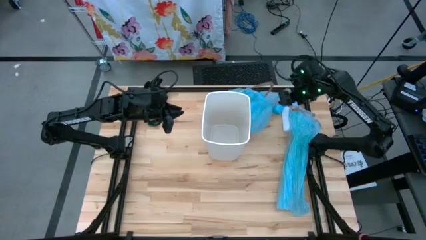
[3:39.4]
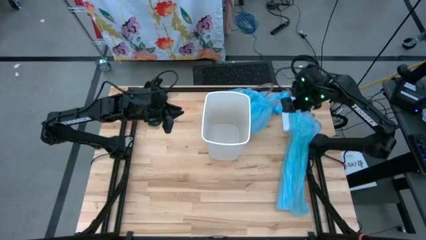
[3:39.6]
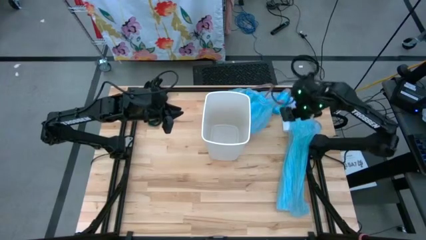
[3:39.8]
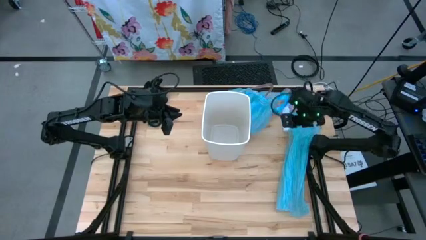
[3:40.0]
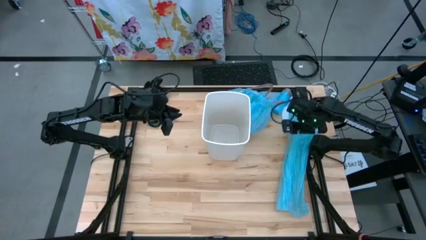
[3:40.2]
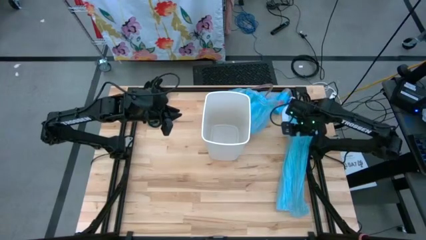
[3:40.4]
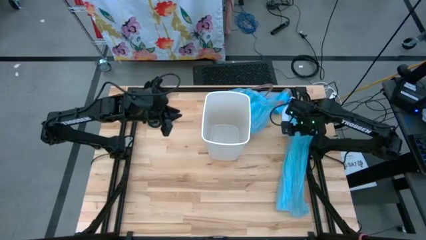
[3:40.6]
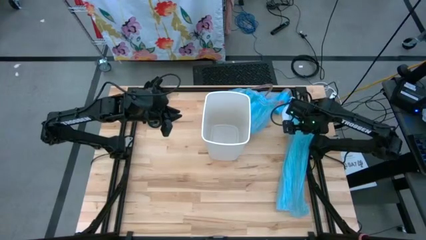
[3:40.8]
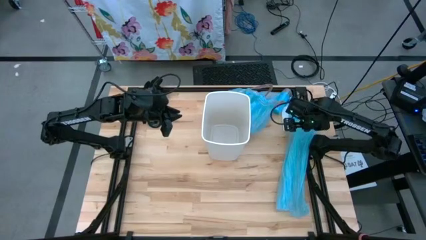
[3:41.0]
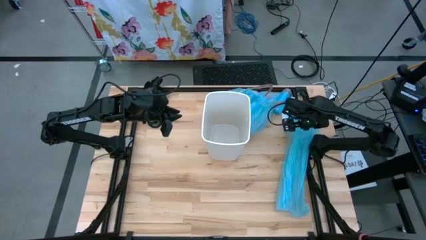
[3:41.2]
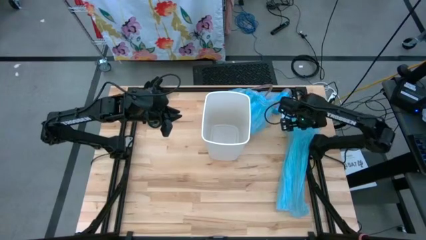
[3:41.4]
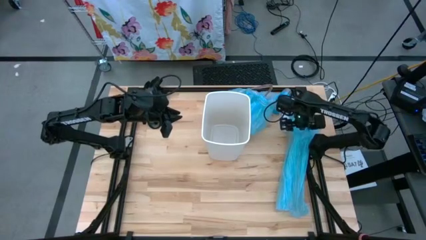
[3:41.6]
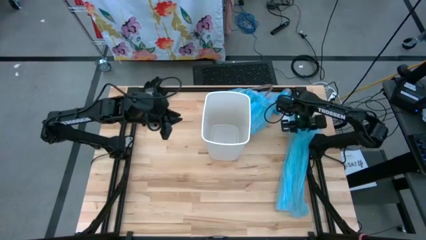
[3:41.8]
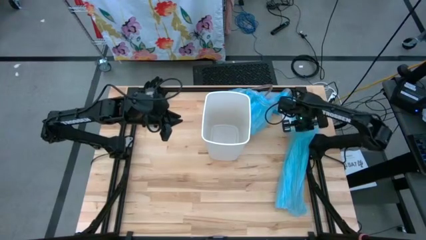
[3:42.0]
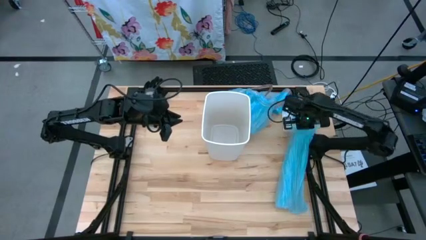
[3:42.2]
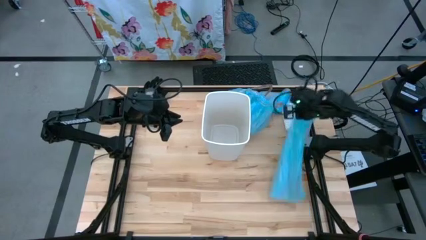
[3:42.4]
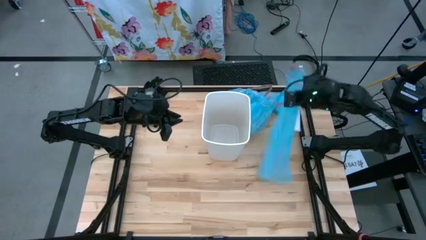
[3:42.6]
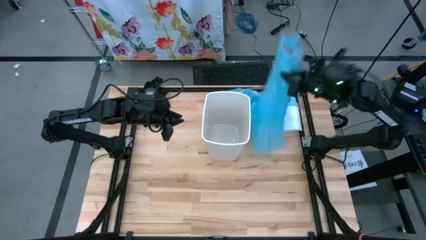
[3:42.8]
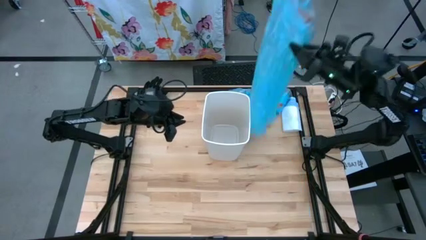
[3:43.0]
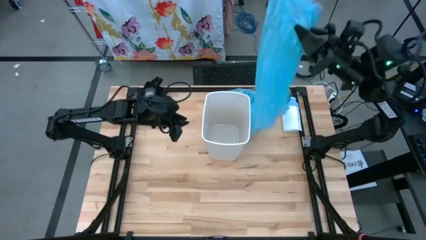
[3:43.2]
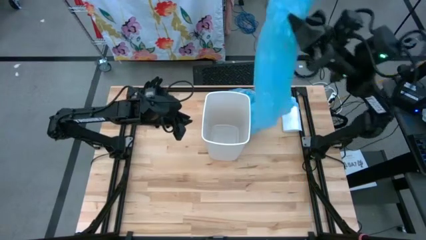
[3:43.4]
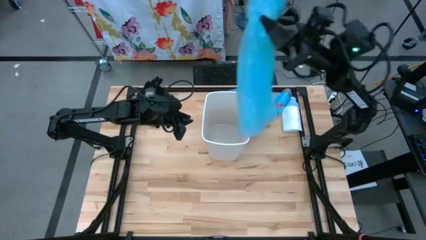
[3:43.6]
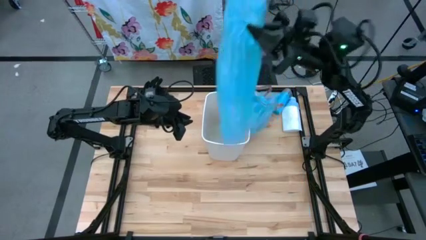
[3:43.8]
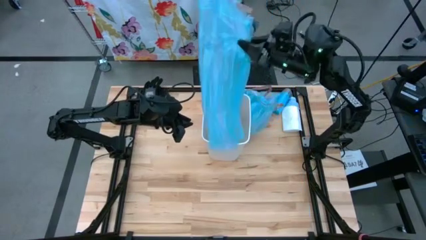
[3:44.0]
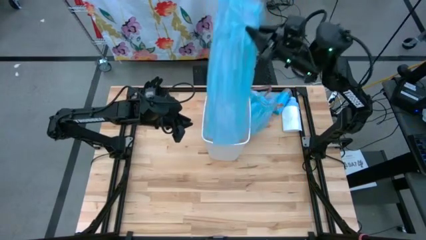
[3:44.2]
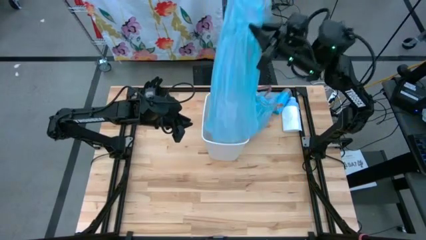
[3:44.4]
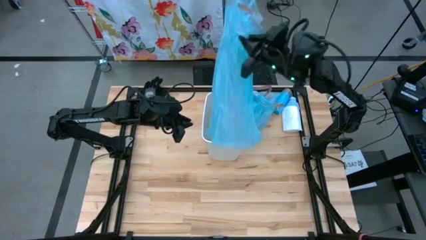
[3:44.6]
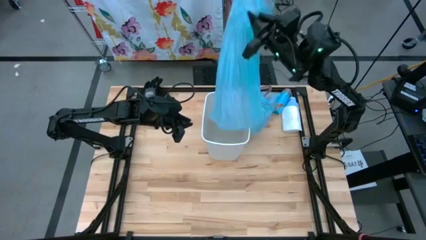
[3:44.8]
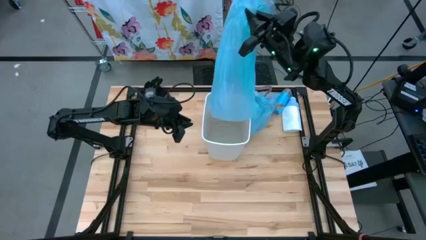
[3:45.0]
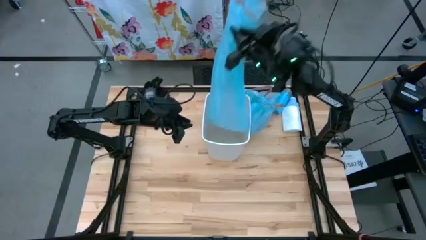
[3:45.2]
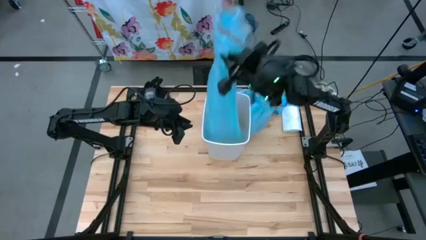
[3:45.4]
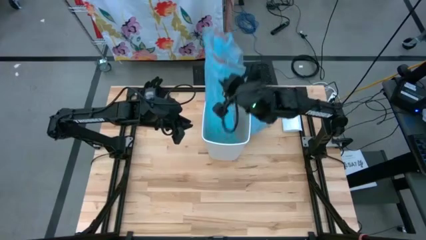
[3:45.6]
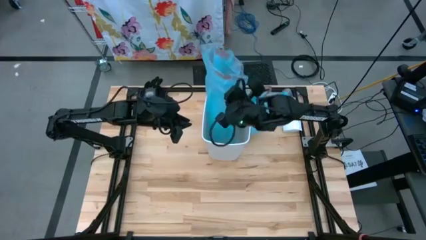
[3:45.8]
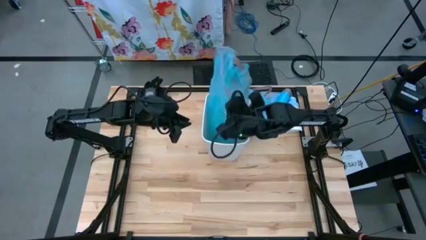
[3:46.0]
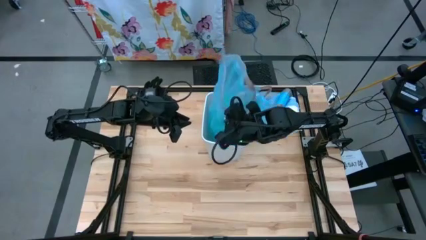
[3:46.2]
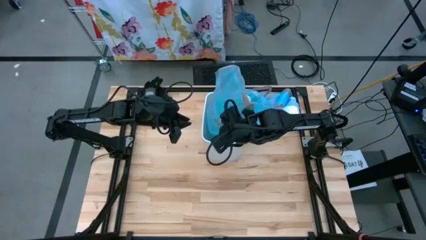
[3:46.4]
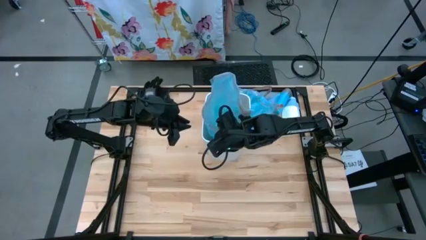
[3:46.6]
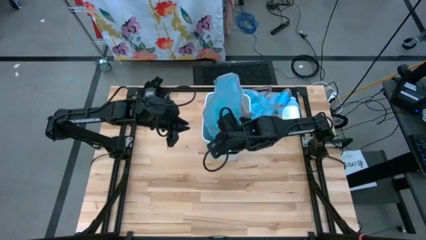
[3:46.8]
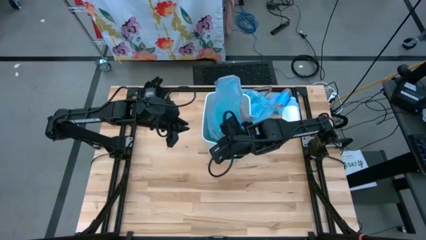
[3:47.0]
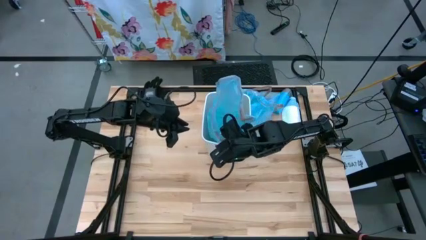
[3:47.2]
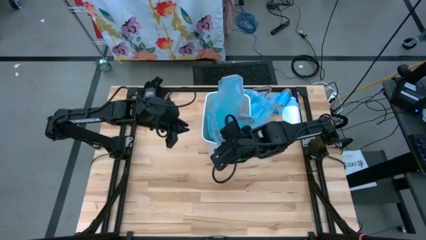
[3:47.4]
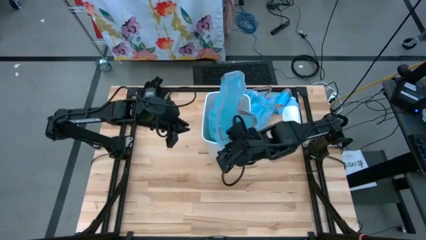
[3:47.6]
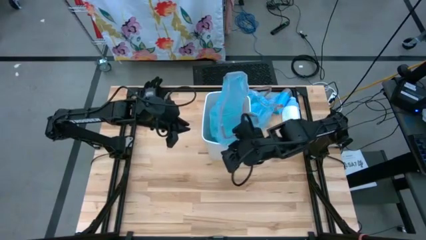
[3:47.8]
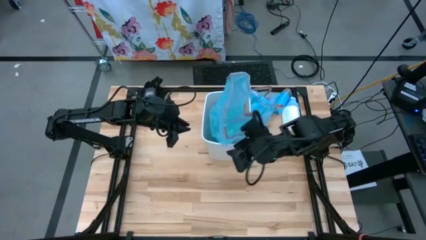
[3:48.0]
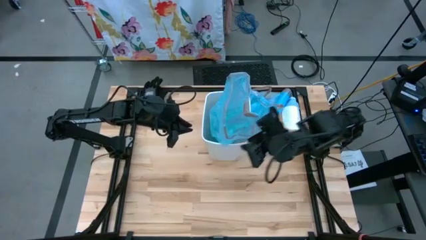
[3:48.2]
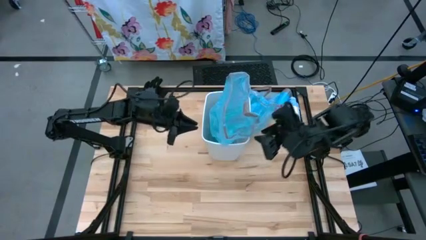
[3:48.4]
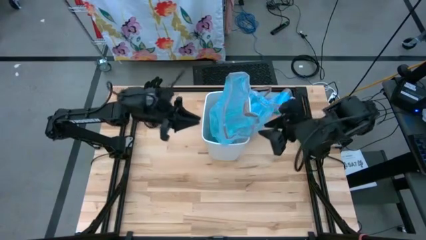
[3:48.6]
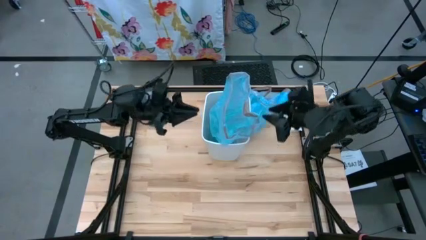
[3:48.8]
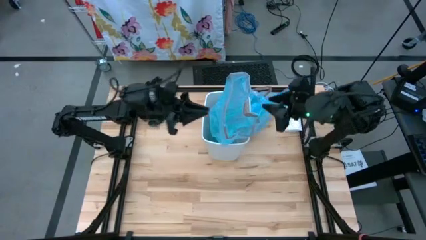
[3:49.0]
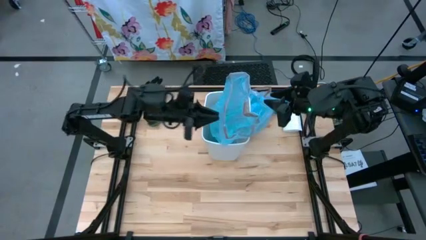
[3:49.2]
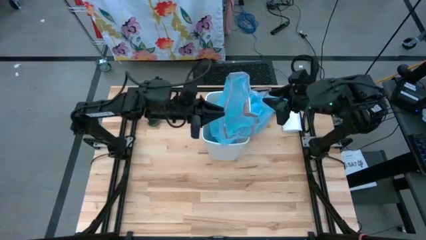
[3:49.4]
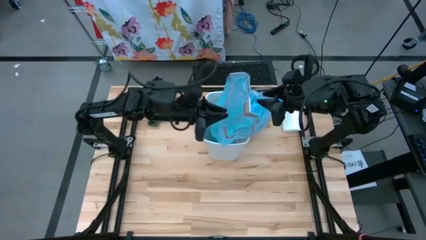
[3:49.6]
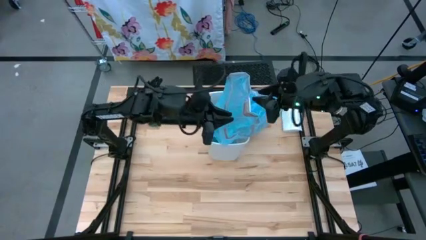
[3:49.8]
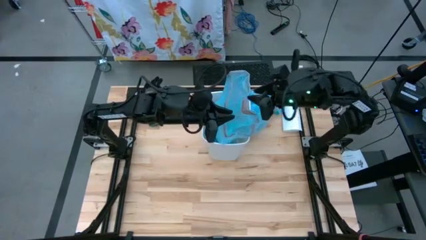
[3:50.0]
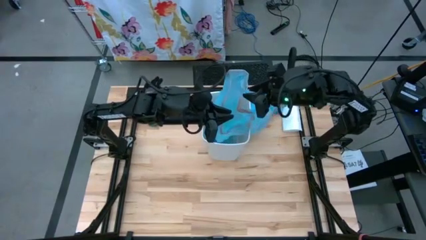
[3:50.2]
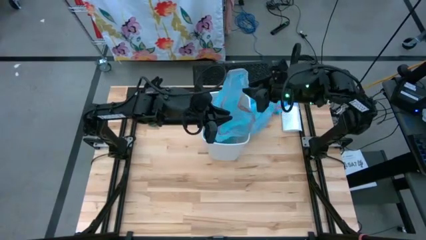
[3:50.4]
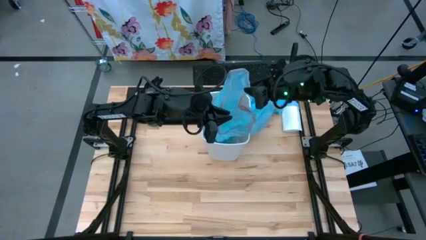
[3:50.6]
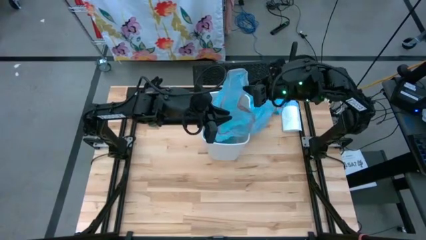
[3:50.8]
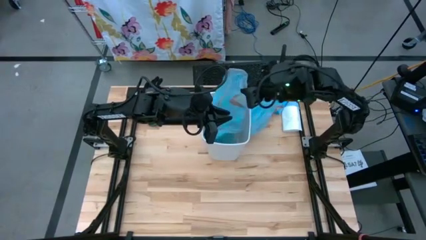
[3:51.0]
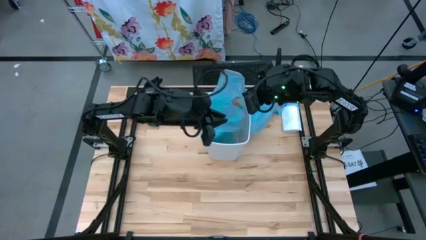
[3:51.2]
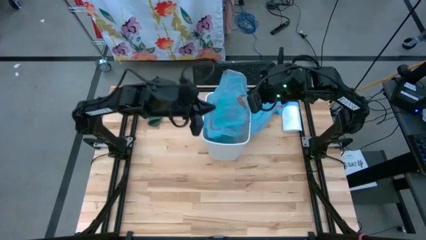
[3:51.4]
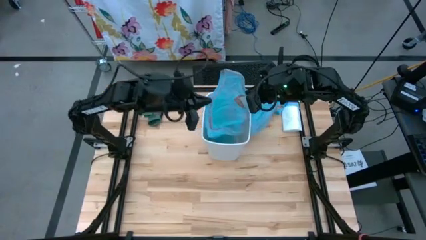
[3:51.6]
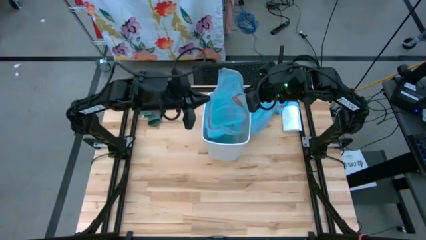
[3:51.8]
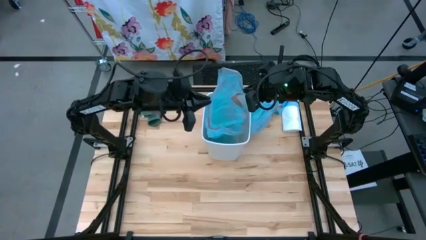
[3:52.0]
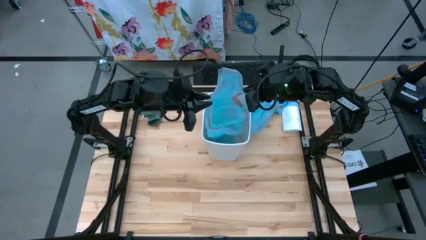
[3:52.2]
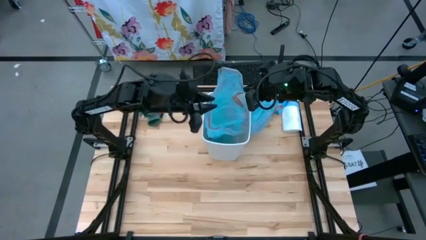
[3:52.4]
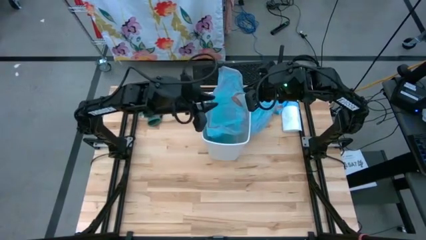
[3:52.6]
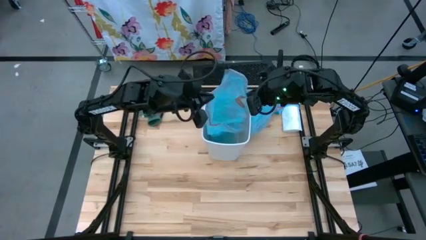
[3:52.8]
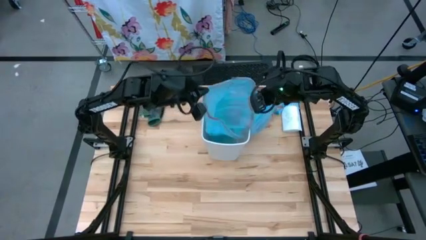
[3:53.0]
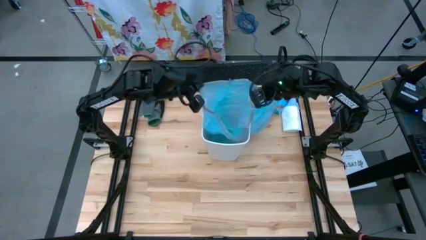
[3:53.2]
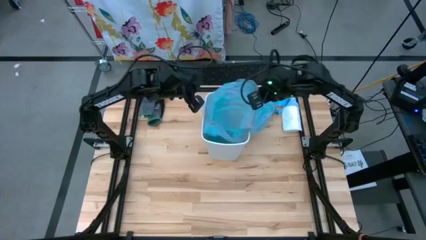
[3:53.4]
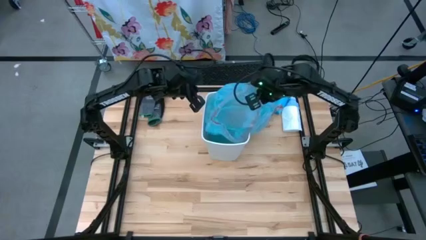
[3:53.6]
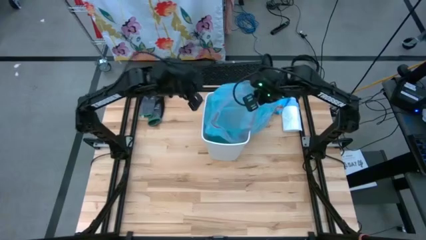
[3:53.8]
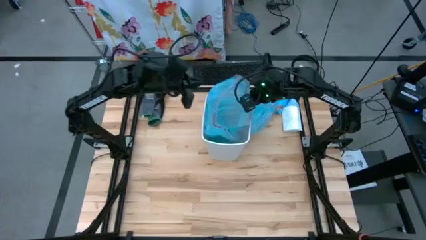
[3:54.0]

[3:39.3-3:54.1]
Task: place trash/remove bag and relplace
Insert the new blue trash bag into the trash bin

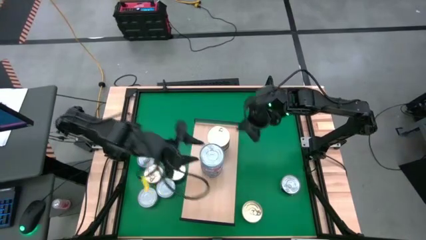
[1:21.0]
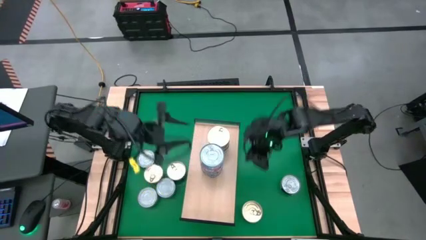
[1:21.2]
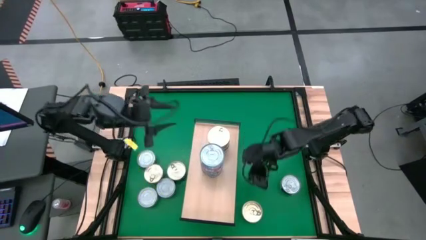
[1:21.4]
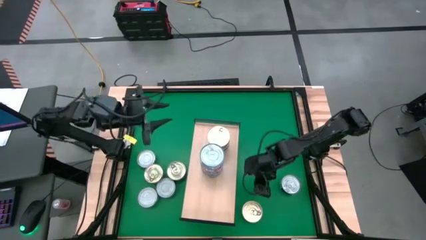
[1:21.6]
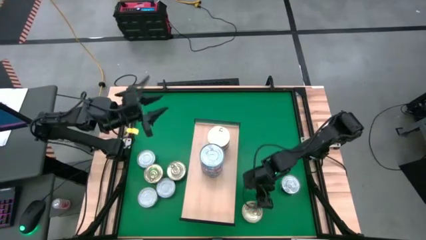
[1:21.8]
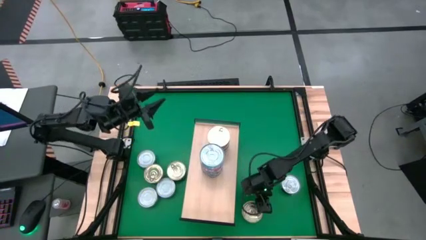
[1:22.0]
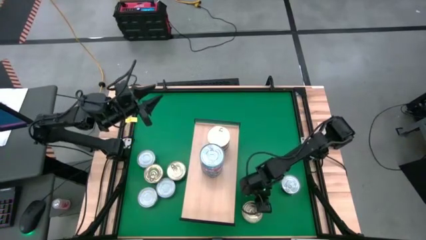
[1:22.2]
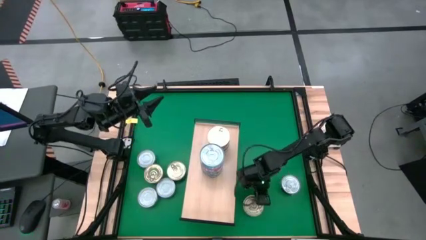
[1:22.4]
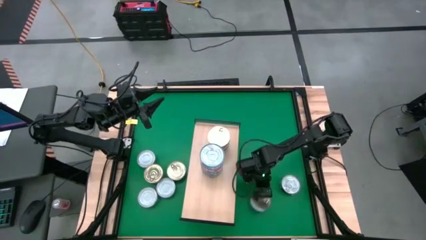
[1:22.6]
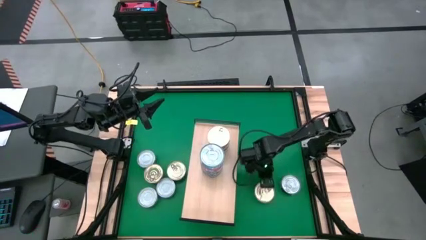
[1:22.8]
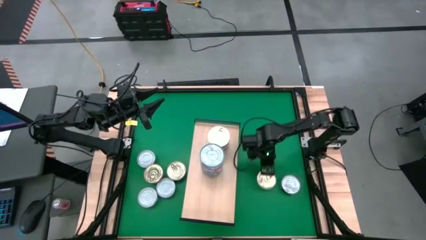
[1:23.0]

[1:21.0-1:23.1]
Task: Stack canned seafood by type on shelf
Stack the blue pink tuna can on top of the other blue pink tuna cans on the shelf
